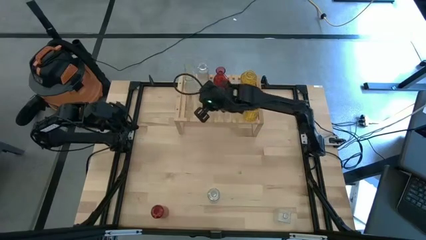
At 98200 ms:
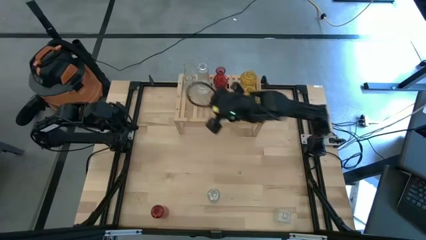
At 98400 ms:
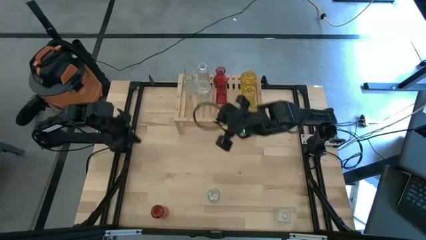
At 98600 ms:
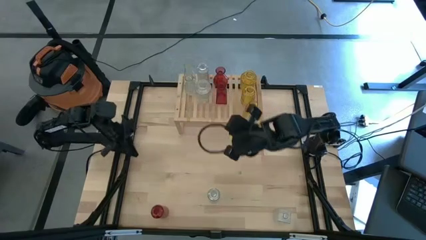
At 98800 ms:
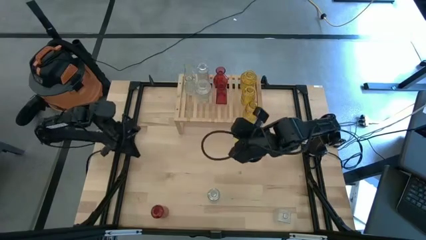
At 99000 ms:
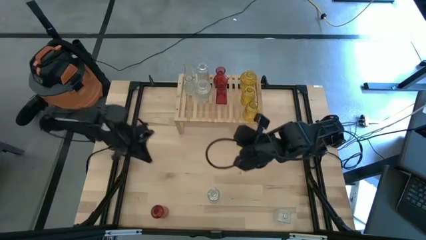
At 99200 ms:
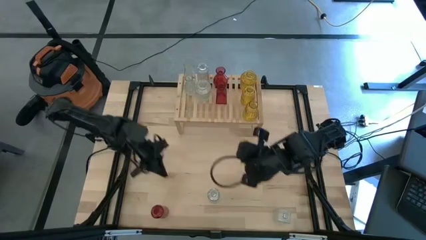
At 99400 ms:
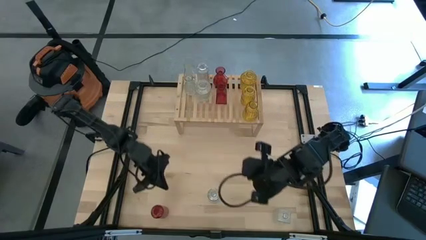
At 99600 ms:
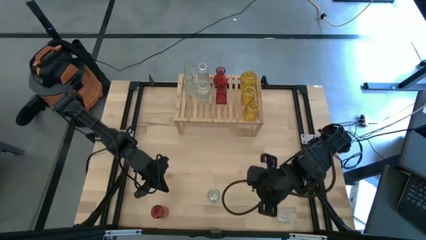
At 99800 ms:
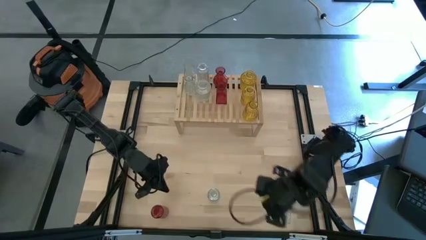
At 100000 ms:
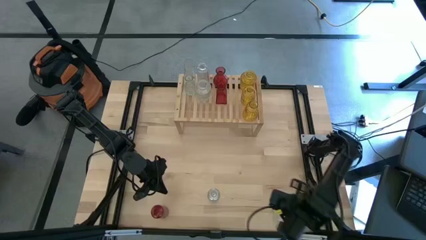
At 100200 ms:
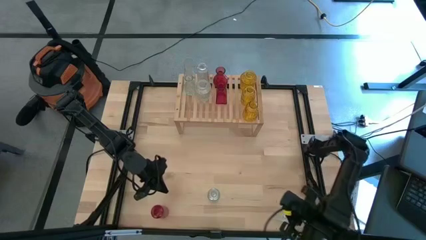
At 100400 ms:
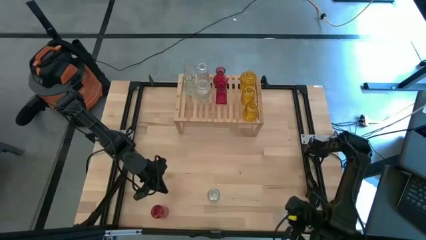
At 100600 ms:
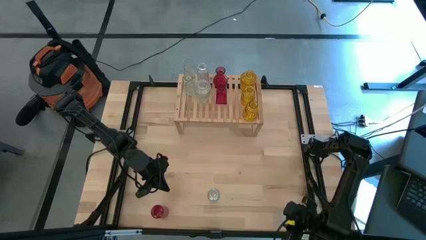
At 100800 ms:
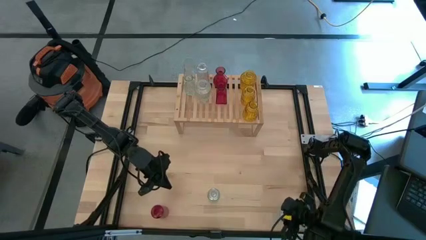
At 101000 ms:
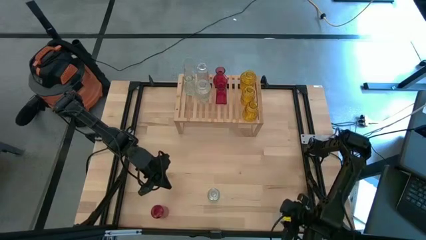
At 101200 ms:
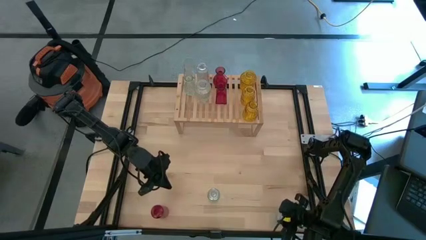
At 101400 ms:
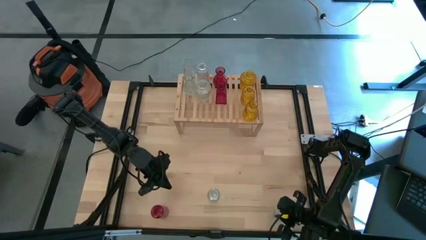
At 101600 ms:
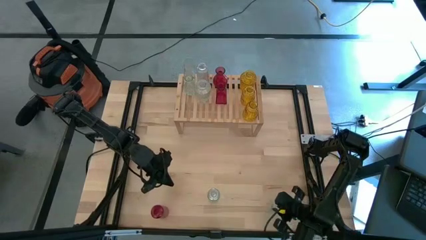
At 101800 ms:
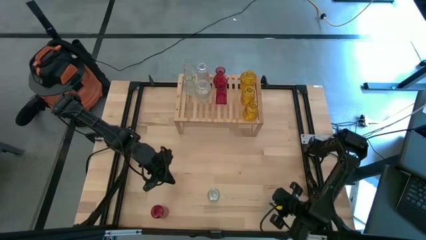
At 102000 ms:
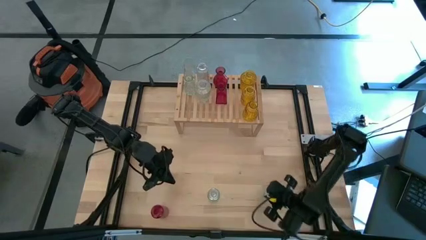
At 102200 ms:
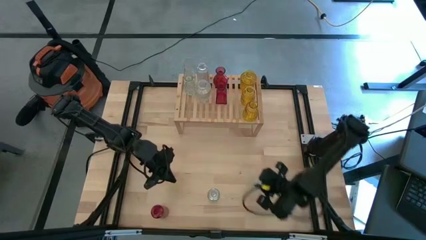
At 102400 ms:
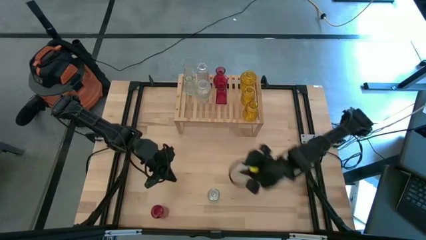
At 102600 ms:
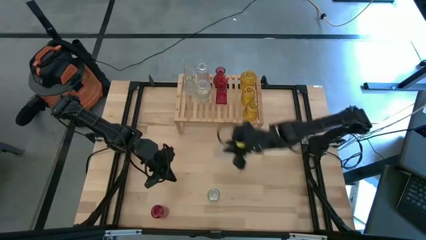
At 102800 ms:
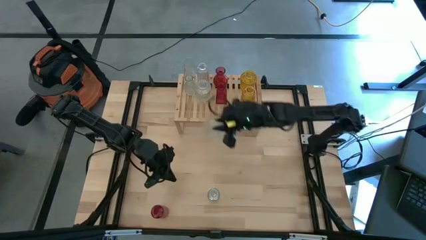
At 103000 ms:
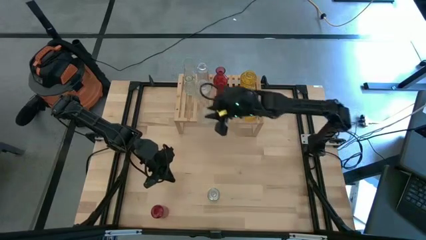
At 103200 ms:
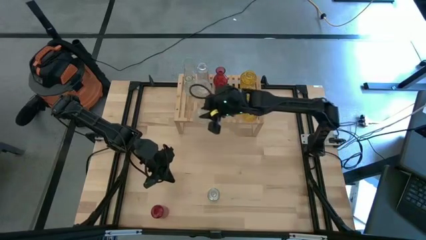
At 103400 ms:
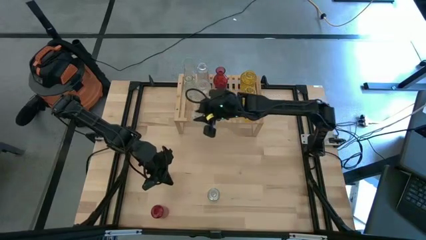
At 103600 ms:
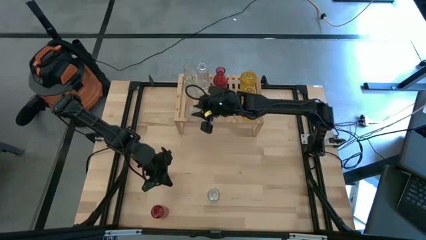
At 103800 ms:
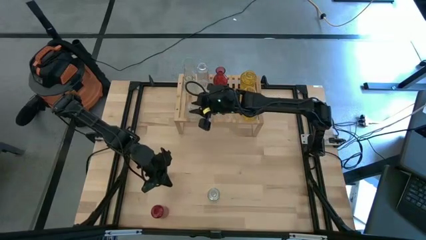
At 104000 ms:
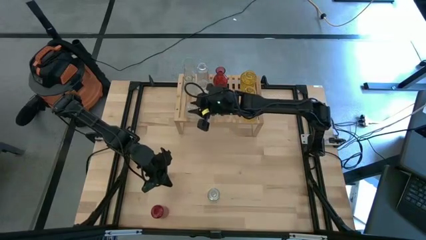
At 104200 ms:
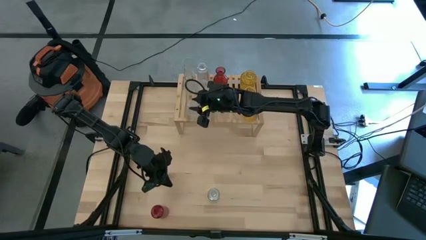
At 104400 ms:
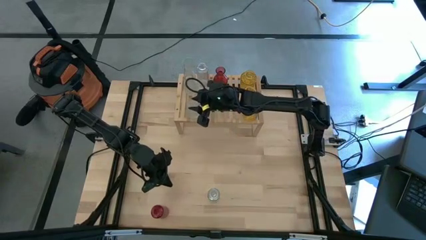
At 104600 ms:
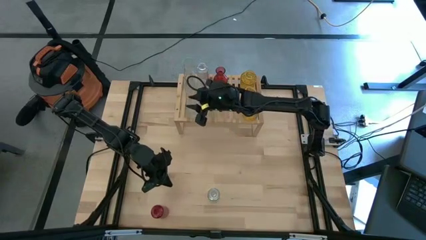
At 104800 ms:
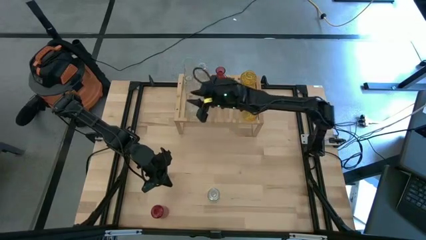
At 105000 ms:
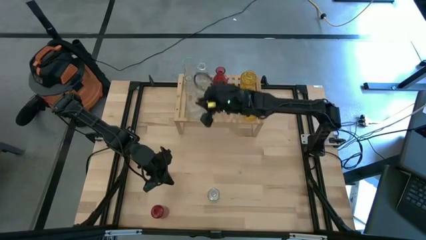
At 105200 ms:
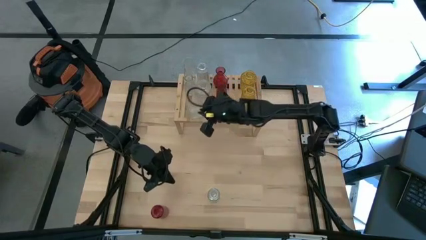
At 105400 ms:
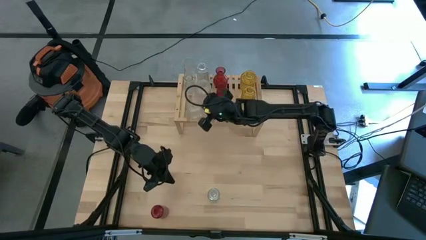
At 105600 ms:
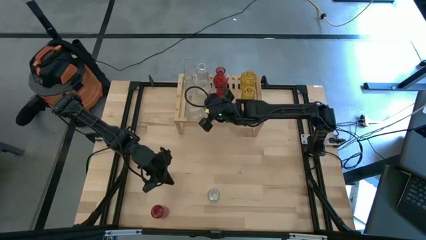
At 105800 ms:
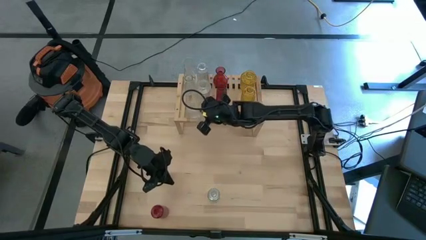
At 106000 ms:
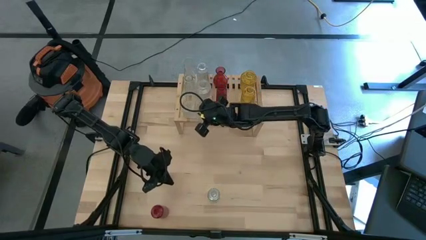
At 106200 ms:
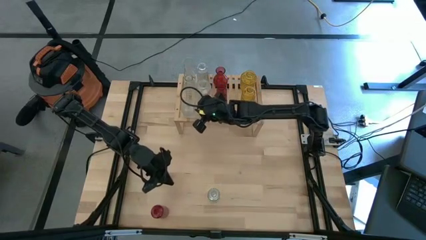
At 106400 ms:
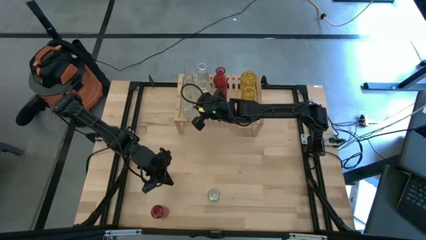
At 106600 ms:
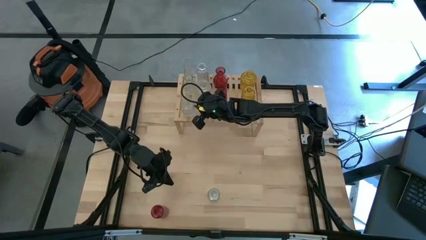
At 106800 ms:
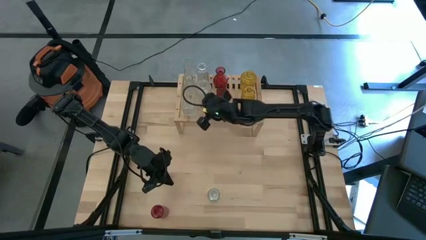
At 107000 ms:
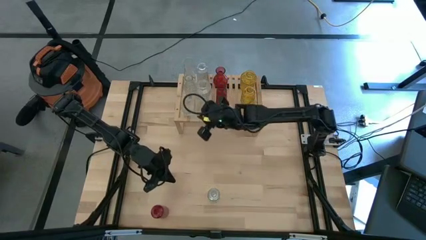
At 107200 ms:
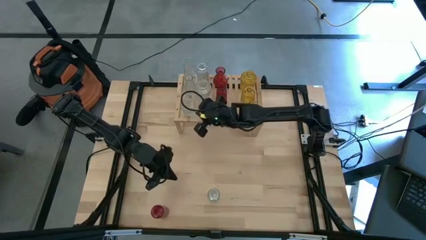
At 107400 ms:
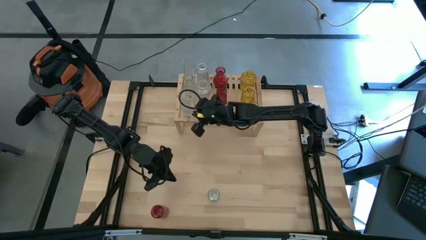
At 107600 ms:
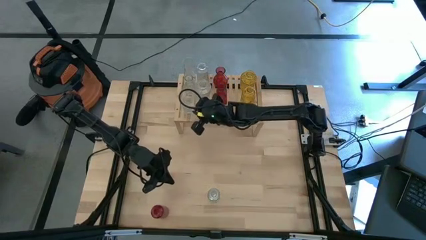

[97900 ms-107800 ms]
Task: sort vases onto shelf
Put the transparent vase on the shelf aligned with the other transparent vases

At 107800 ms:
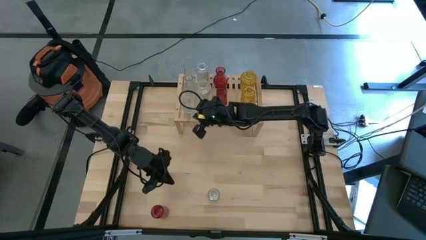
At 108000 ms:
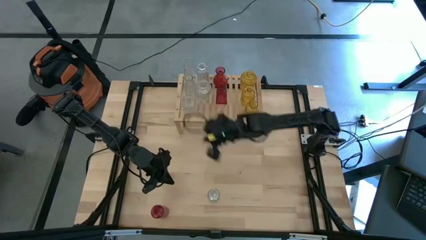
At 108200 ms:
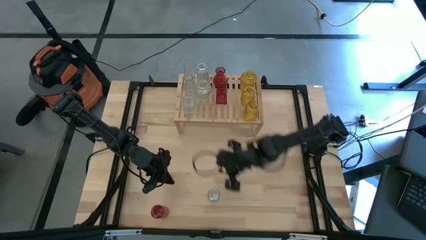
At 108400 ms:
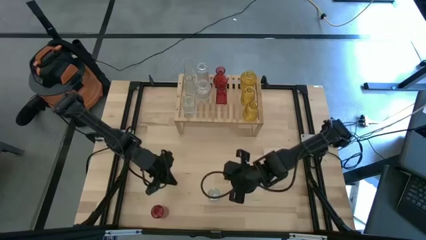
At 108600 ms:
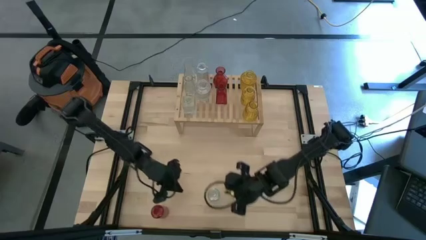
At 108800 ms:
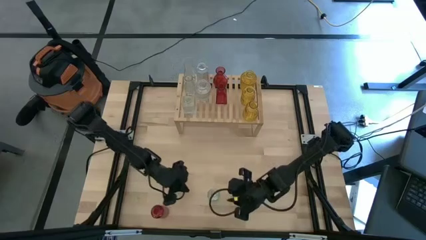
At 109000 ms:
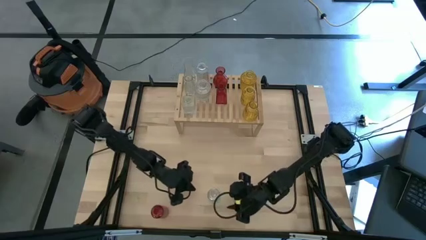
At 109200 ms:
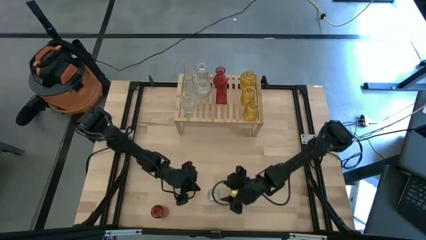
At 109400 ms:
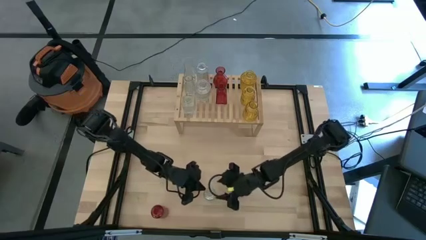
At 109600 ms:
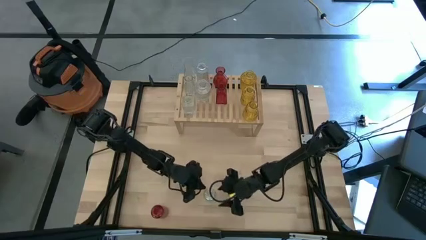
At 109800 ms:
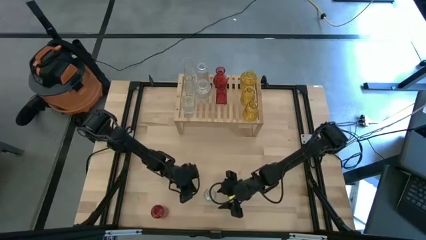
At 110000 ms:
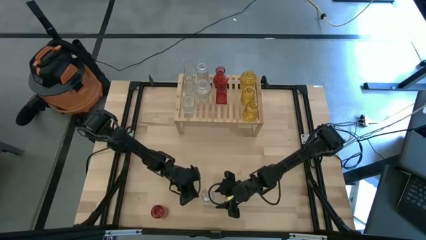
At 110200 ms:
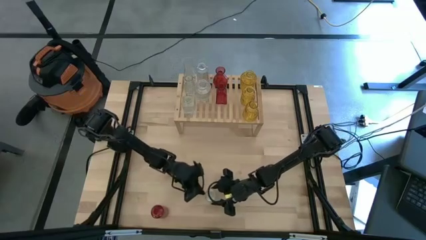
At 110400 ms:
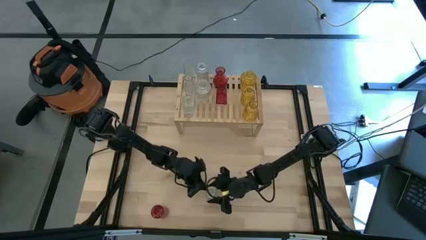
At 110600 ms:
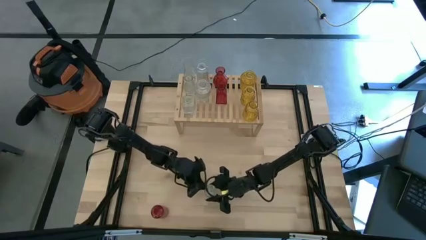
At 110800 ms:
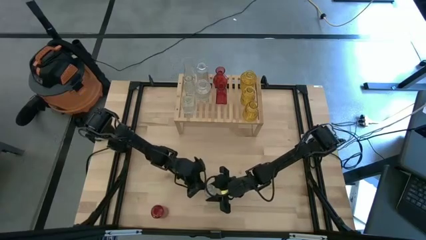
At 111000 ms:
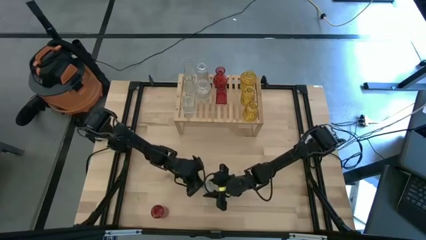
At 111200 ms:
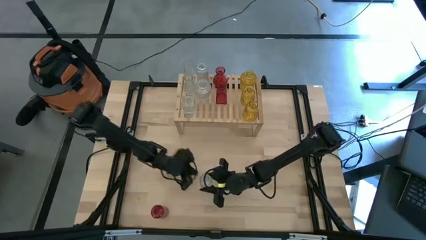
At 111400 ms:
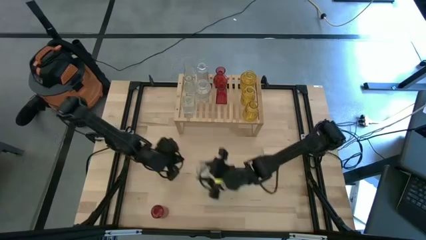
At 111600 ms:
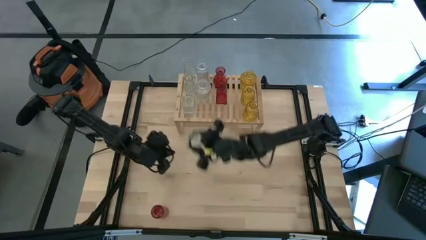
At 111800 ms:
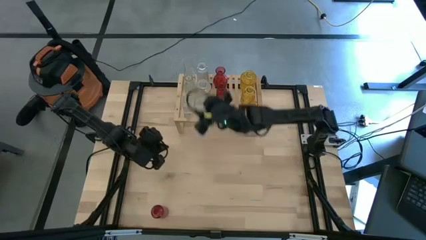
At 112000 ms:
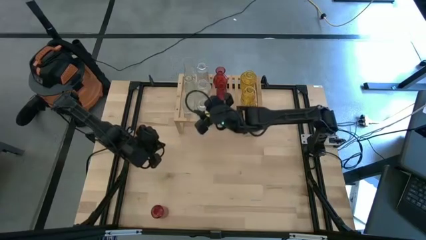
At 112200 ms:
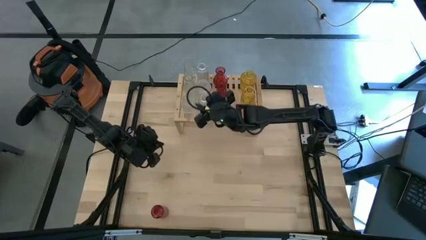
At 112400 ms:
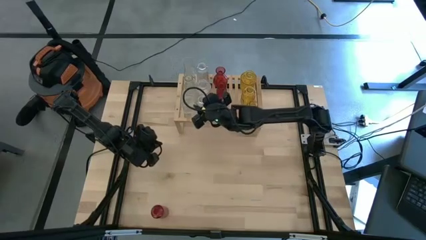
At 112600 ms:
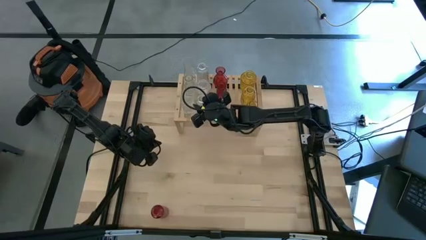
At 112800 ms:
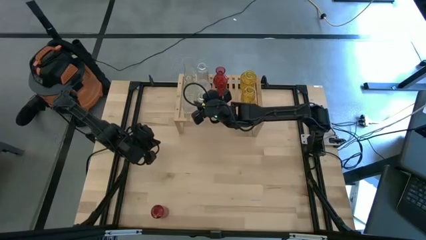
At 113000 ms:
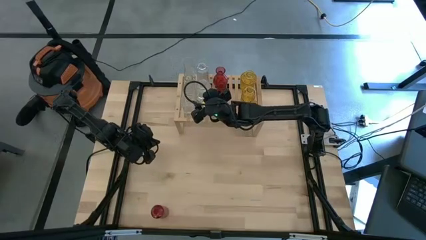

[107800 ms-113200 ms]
Put the transparent vase on the shelf aligned with the other transparent vases

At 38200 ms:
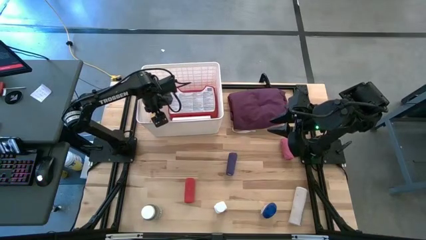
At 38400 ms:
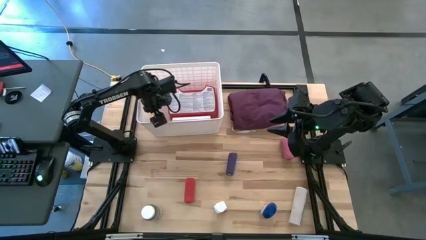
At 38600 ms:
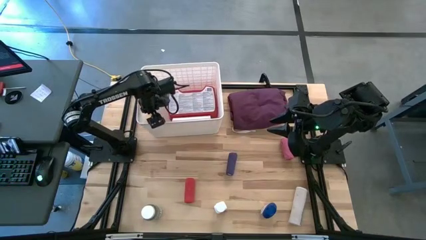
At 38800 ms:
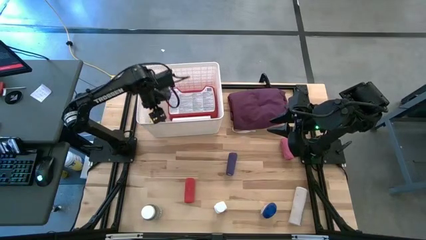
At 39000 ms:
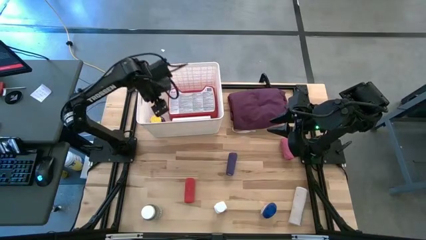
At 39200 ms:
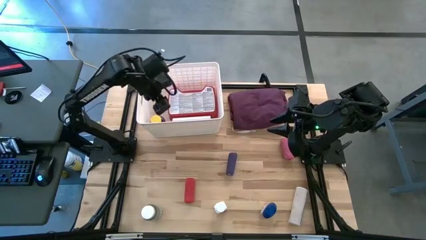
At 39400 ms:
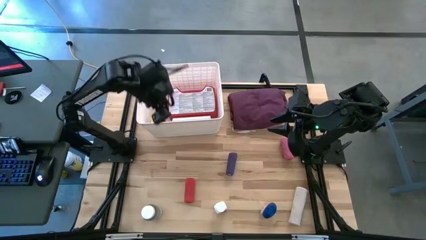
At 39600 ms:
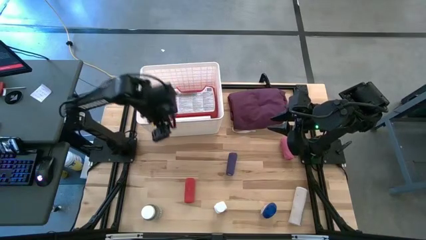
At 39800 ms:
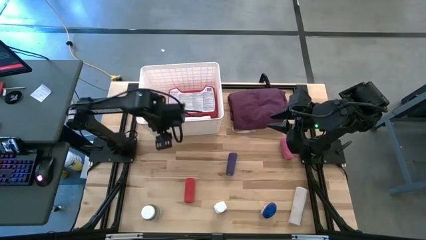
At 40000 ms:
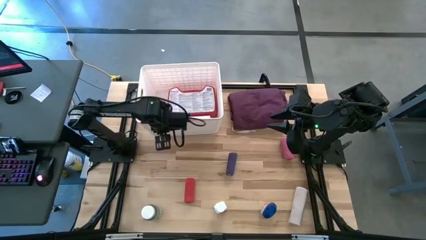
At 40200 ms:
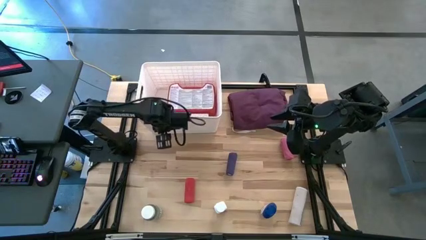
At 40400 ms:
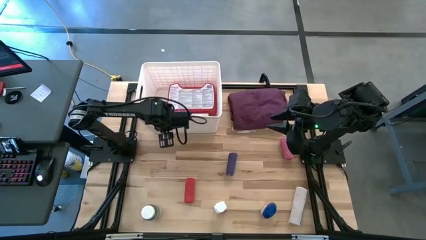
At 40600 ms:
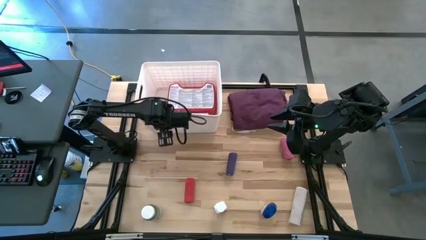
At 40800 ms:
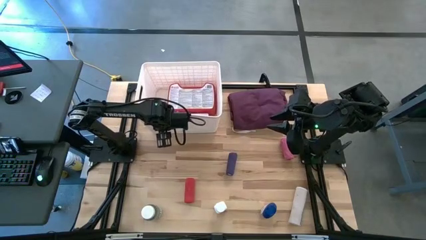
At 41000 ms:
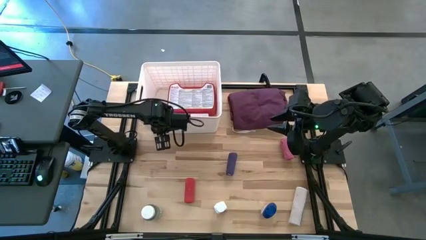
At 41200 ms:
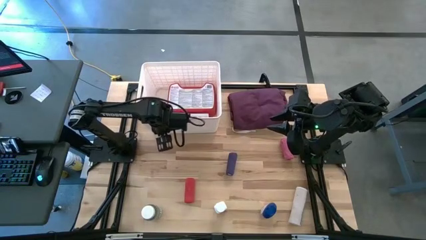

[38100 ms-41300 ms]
Task: Pick & place medical supplies in basket/bin
Adjust the white bin
